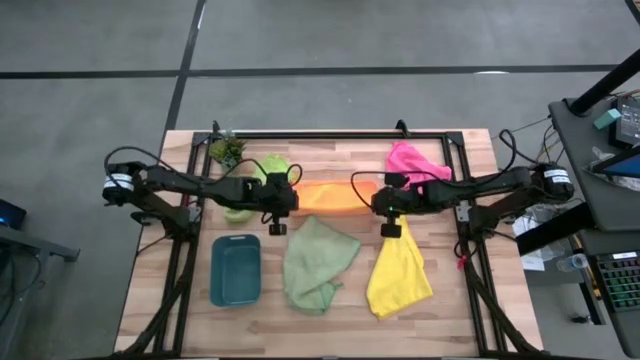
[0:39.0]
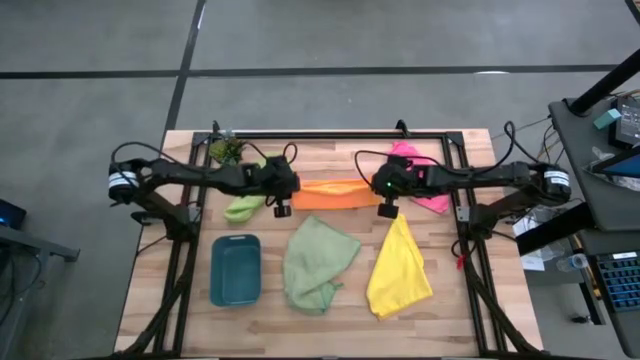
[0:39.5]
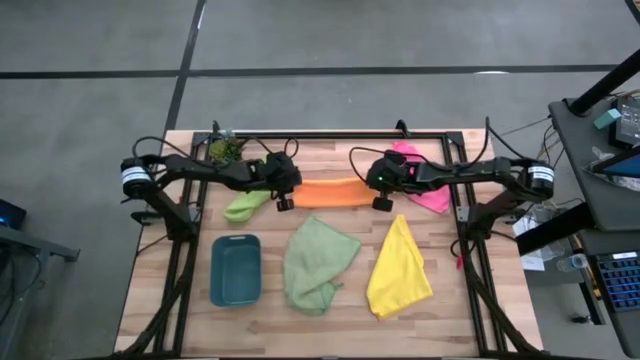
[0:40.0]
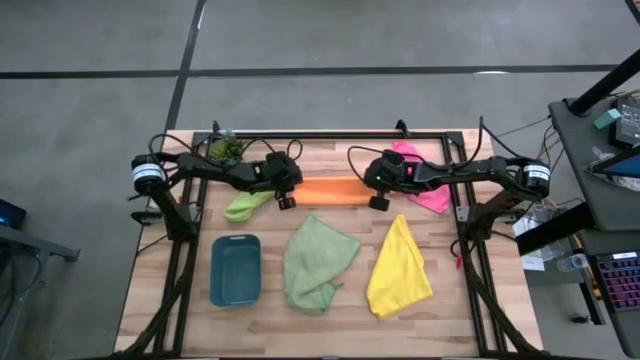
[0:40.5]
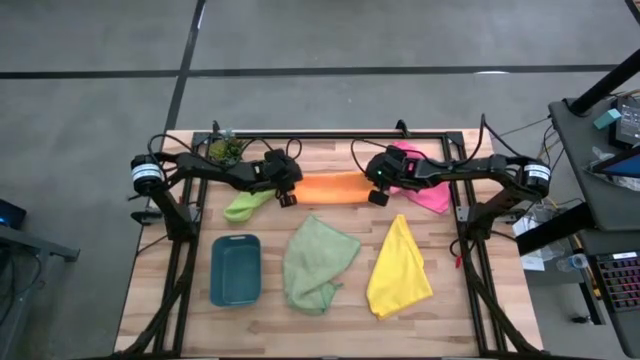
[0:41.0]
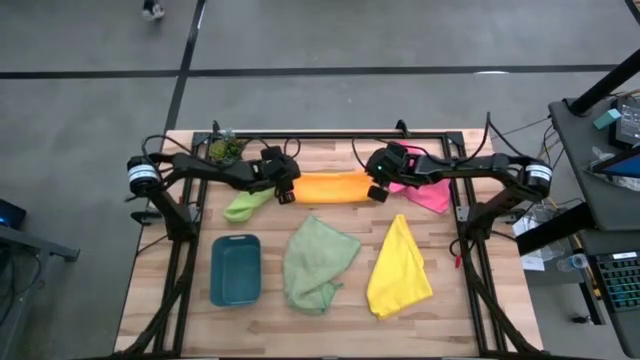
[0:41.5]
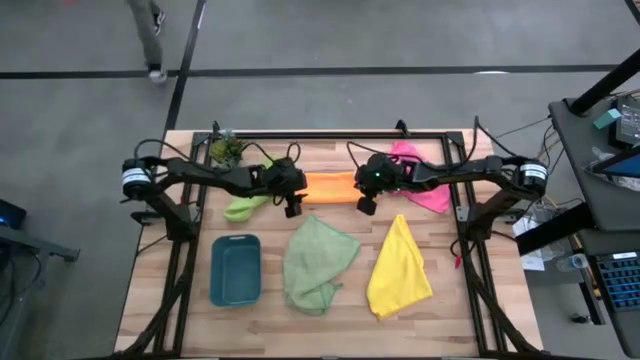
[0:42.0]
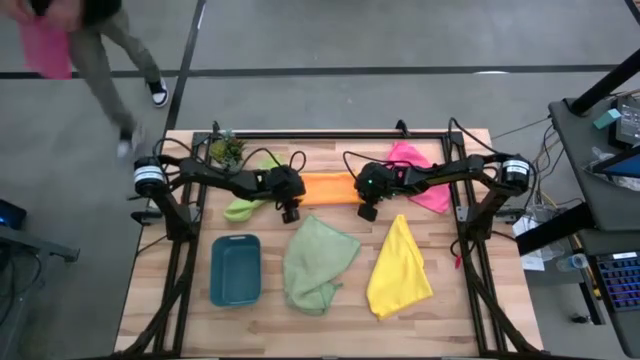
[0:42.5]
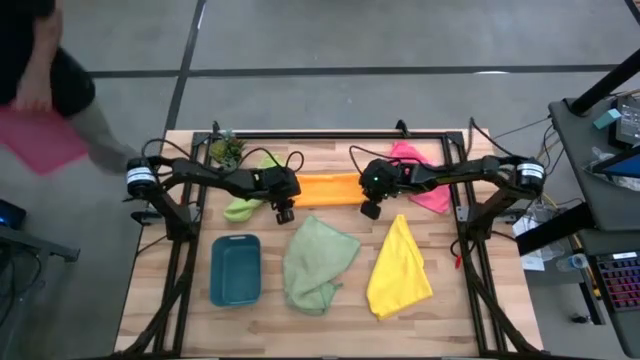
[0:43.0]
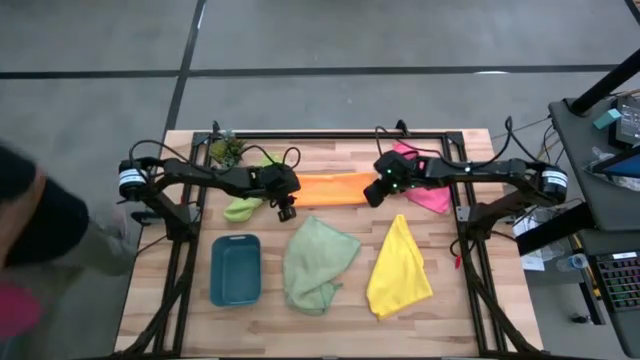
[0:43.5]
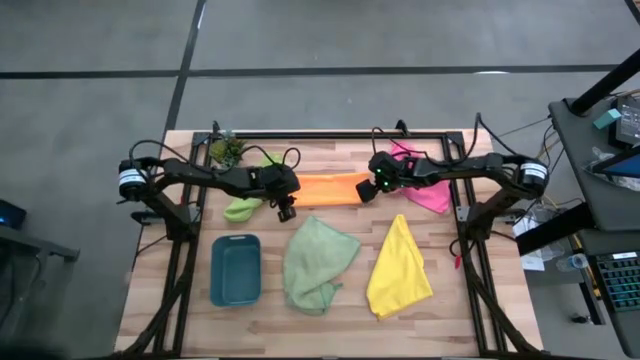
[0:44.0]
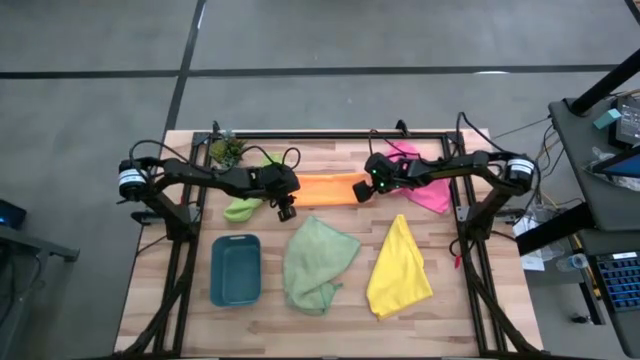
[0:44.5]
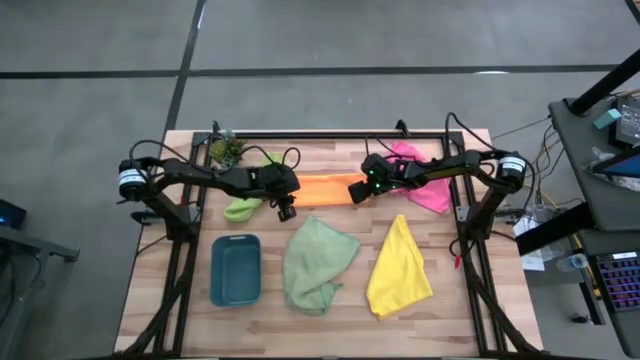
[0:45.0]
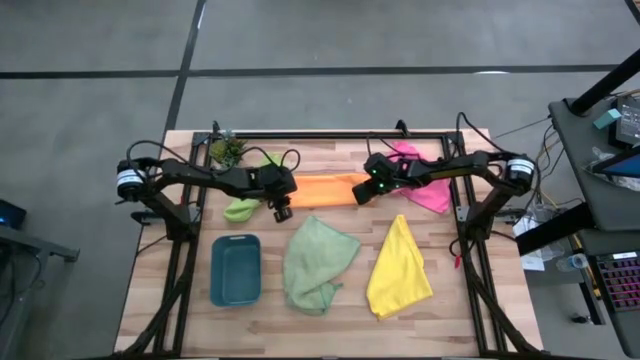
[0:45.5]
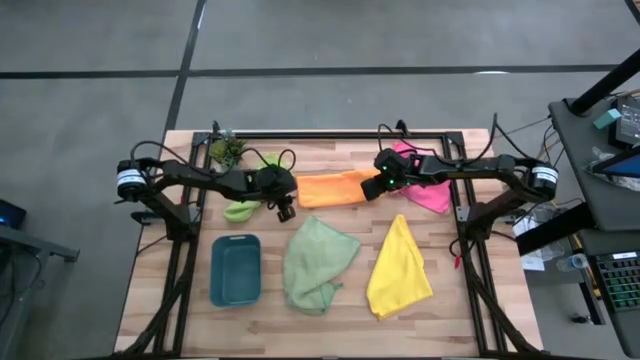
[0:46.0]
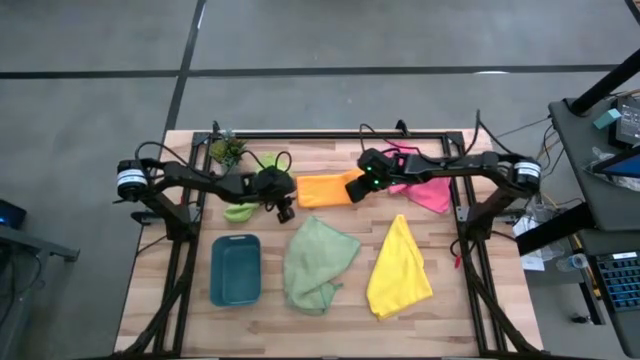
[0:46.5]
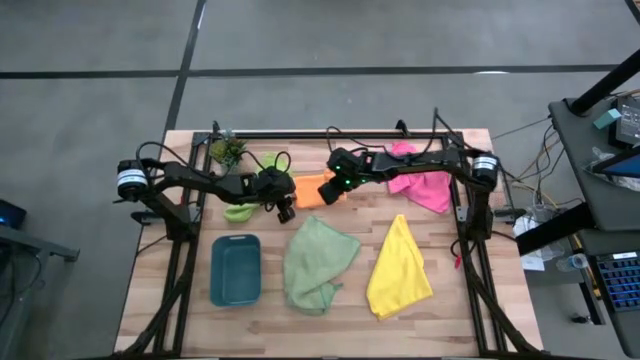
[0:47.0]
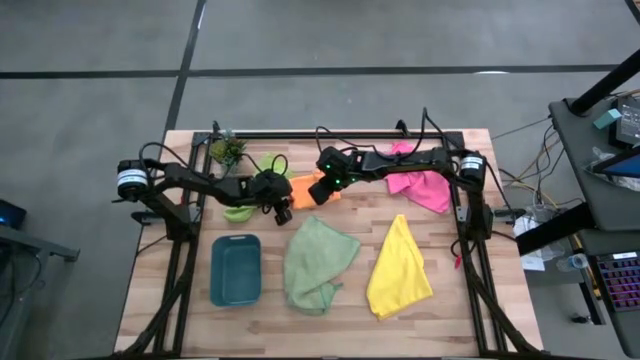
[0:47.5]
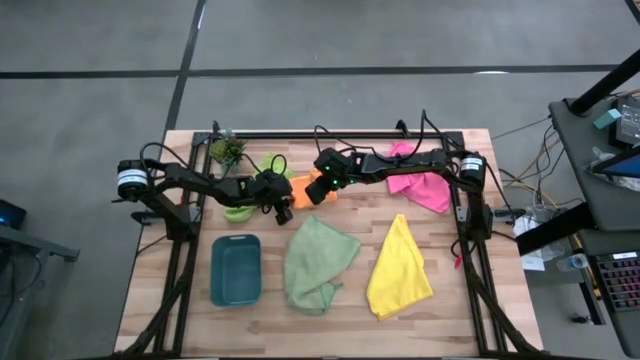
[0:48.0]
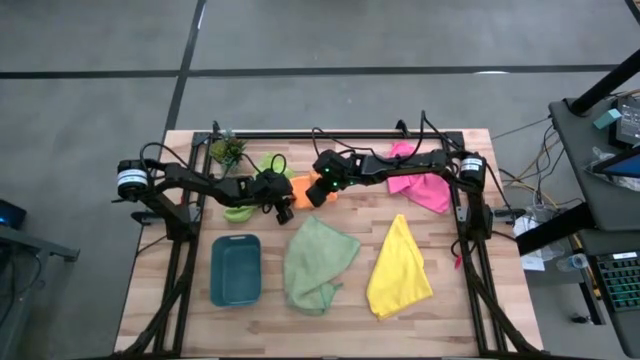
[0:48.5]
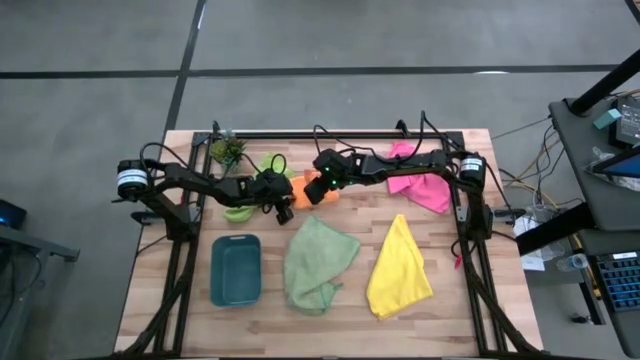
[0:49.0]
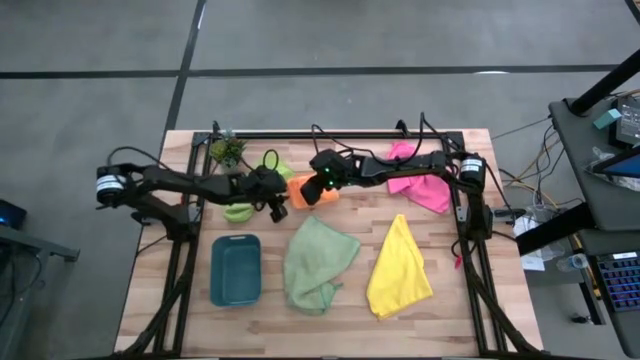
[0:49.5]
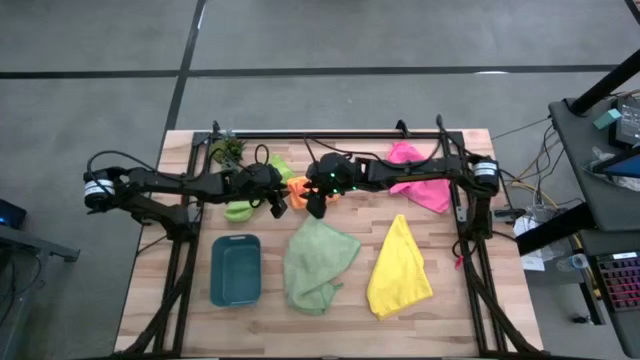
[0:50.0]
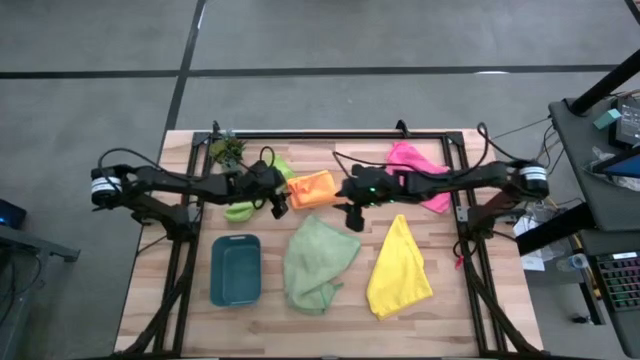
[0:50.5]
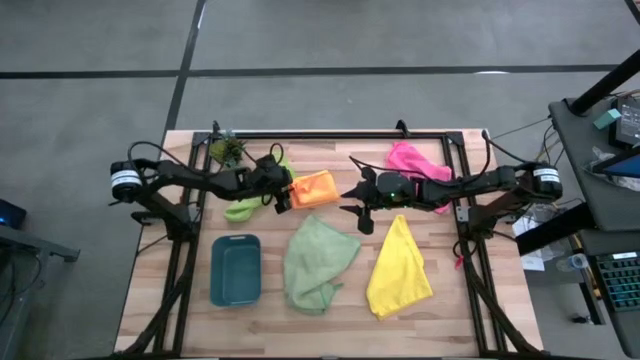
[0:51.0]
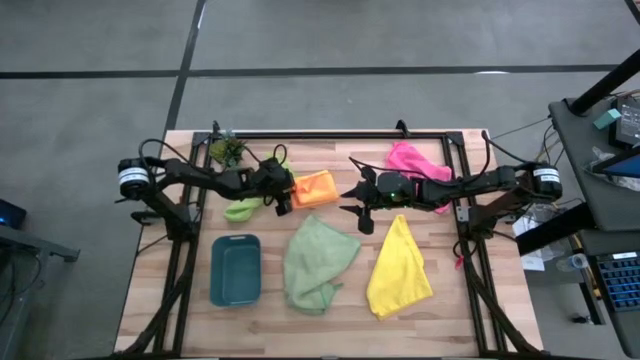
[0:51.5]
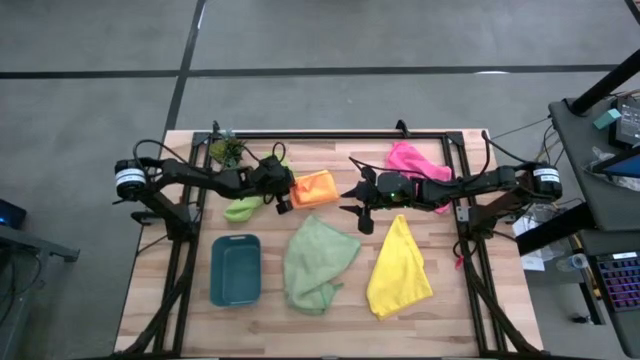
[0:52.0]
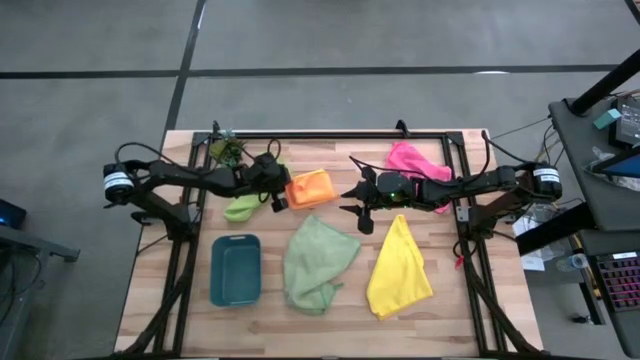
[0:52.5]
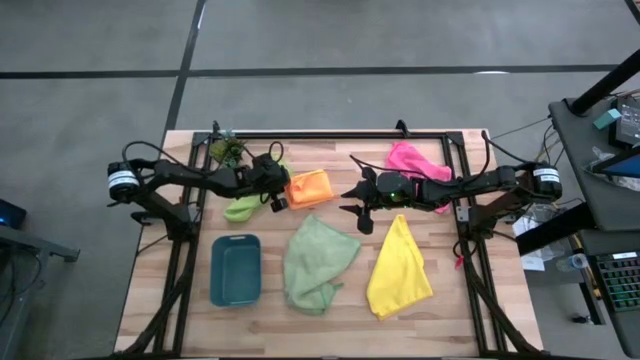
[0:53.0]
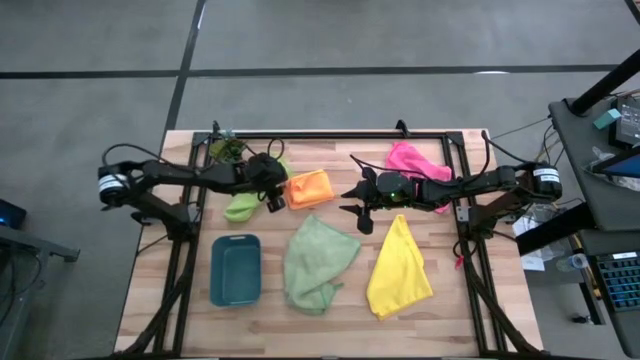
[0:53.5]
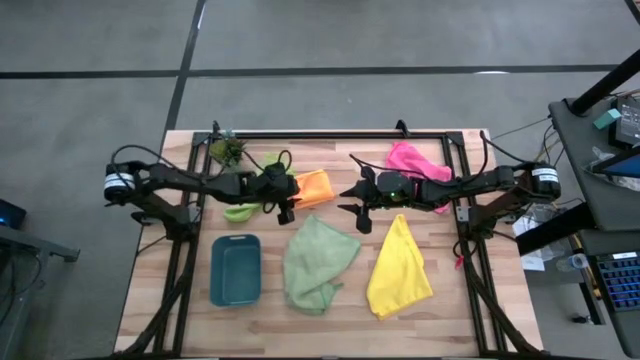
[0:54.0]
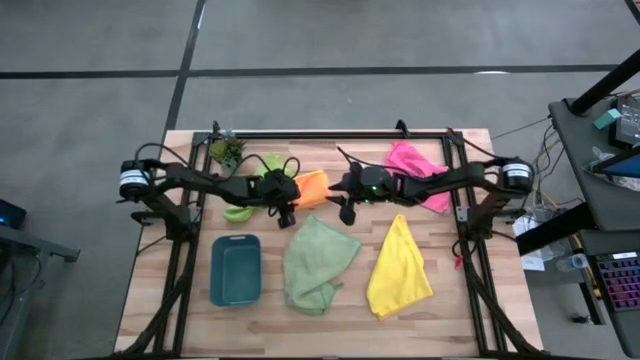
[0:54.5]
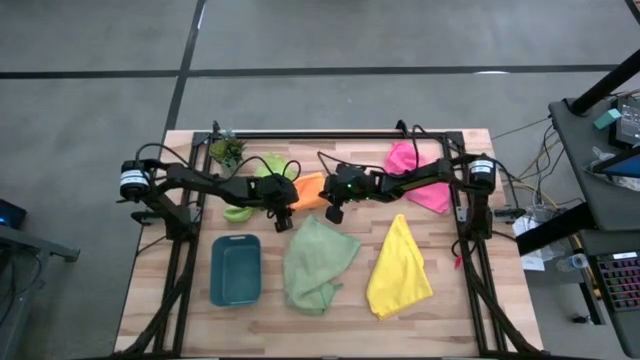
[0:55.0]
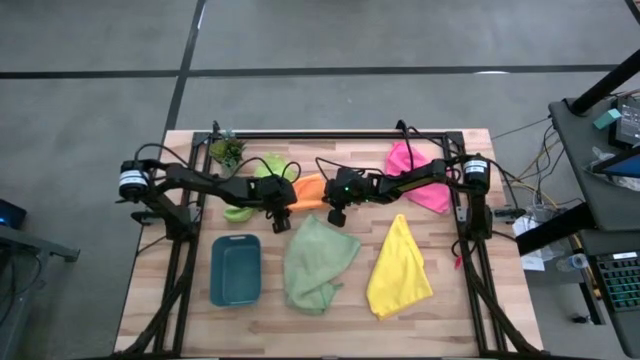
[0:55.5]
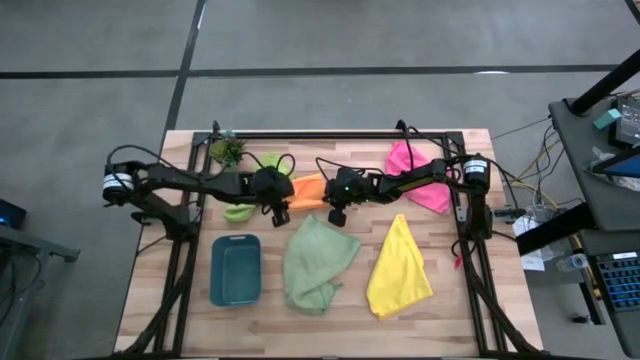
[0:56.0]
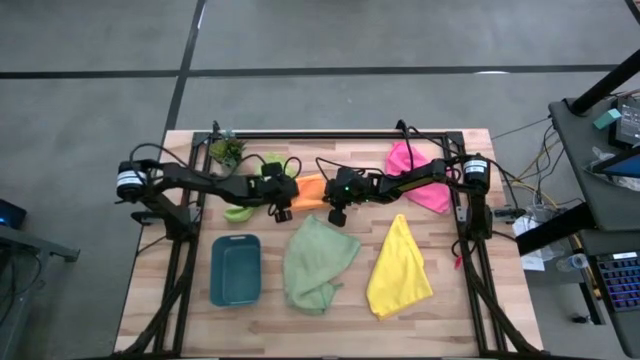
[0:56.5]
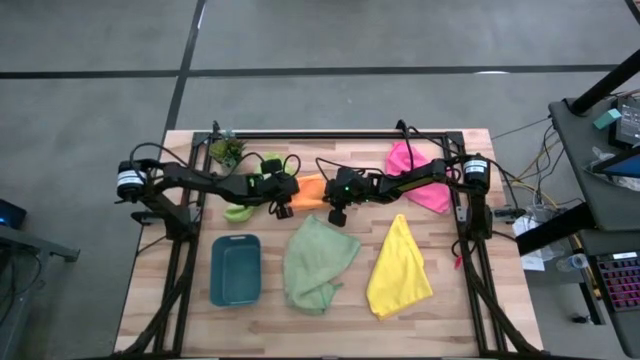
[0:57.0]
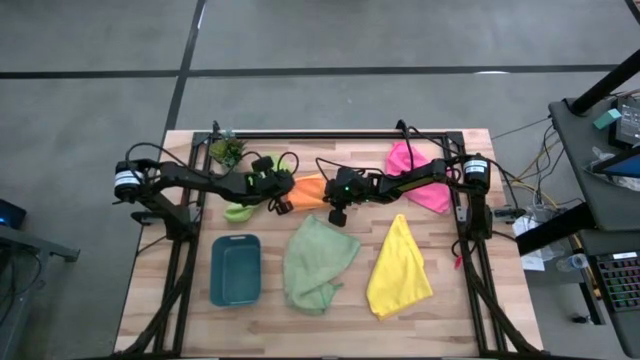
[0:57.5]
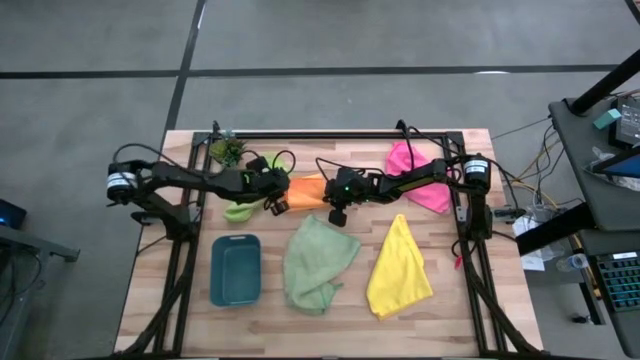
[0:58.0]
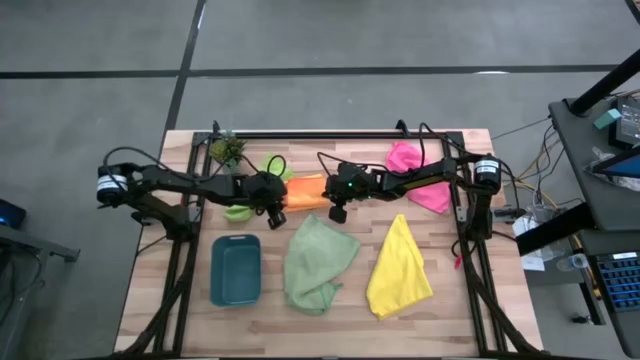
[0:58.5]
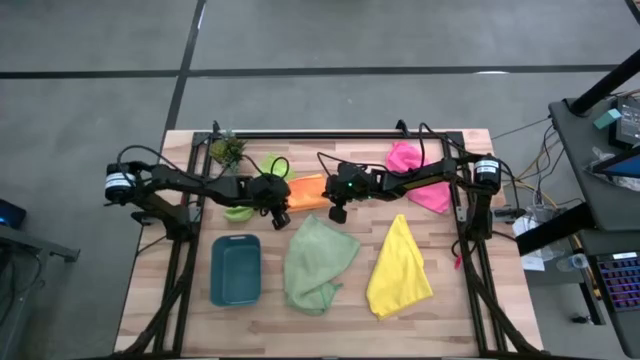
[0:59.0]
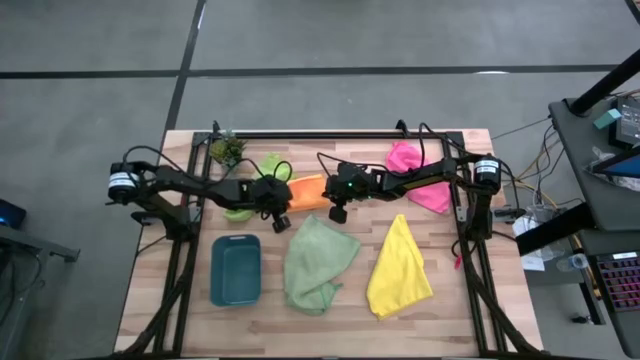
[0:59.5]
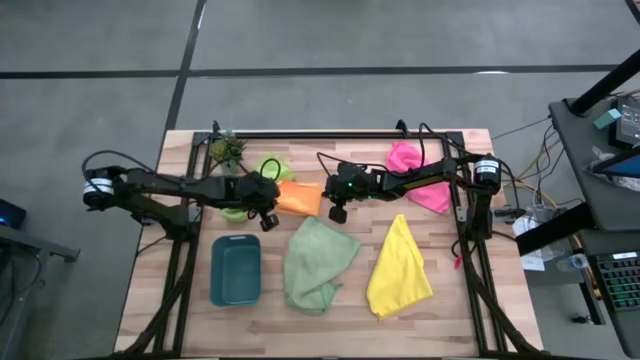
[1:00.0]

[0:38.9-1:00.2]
Task: Fold microfiber towels
Fold the orange microfiber cloth

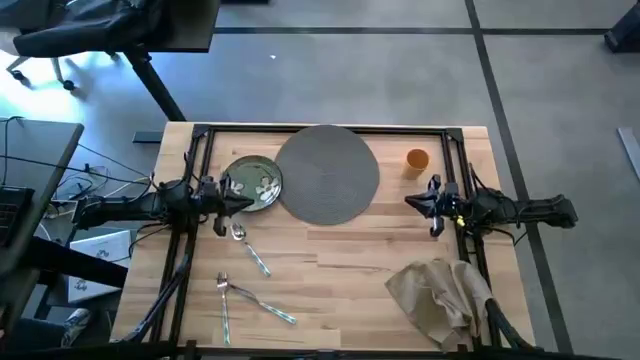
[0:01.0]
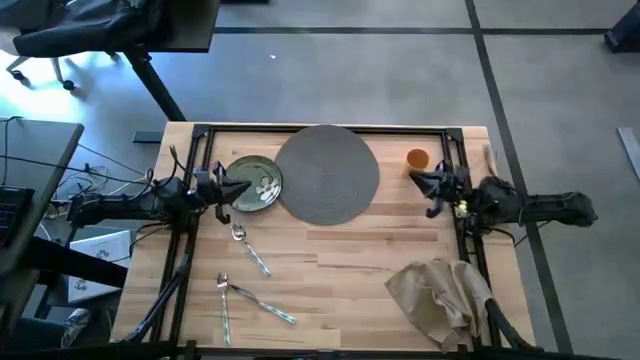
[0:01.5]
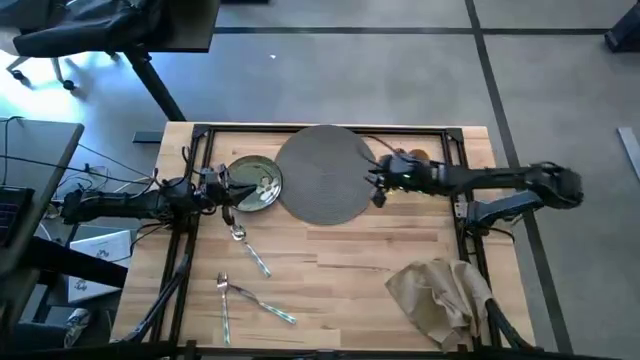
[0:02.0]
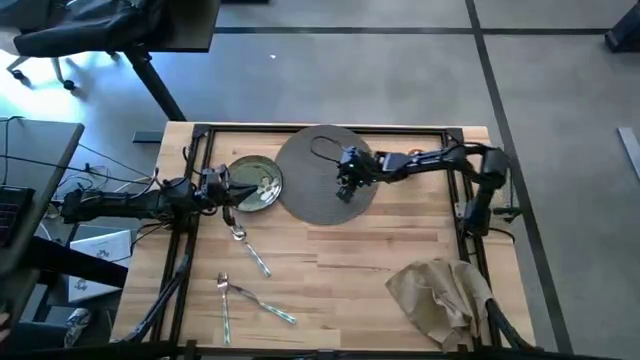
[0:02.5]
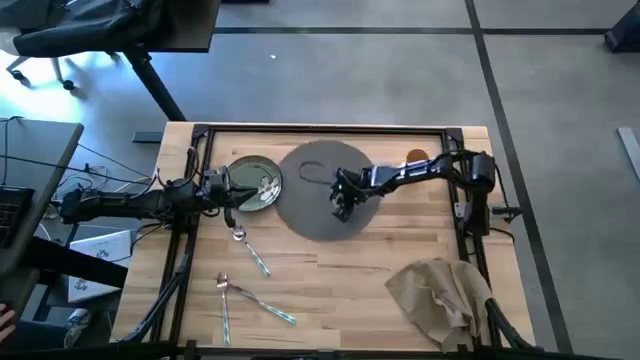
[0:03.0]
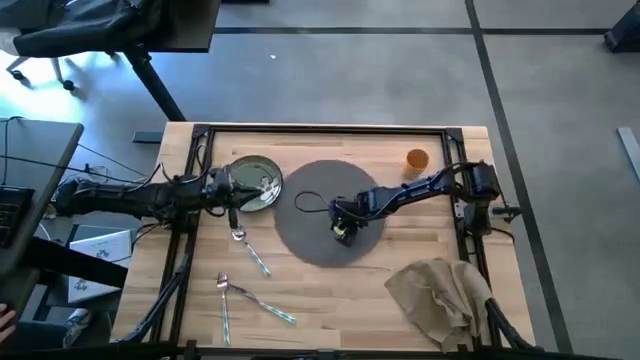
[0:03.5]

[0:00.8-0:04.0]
Task: Set table place
Prepare the gray placemat to the center of the table
